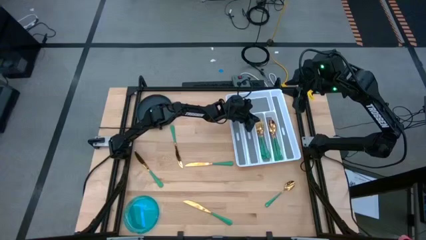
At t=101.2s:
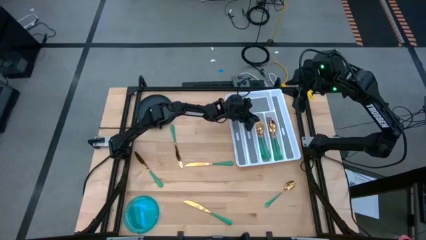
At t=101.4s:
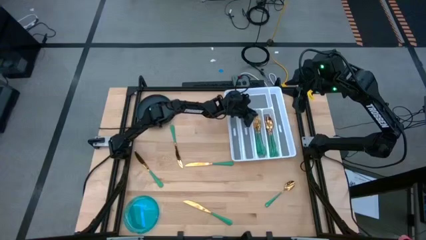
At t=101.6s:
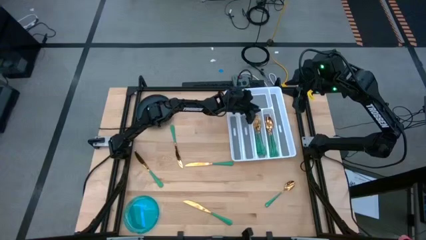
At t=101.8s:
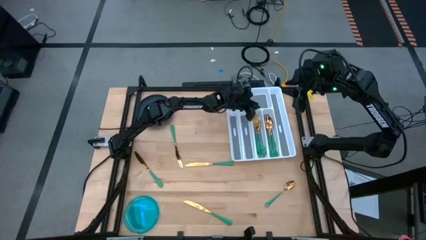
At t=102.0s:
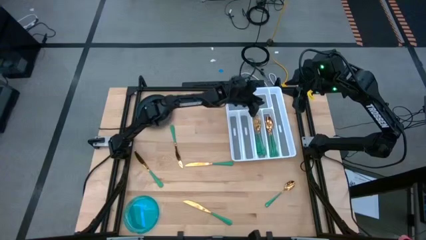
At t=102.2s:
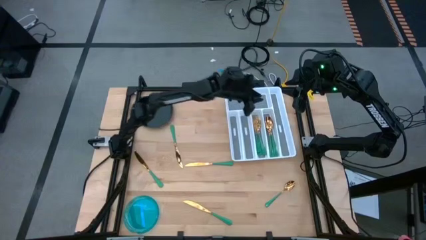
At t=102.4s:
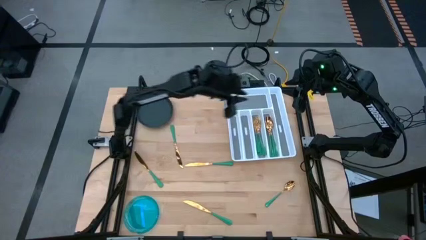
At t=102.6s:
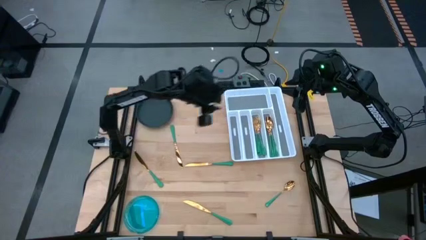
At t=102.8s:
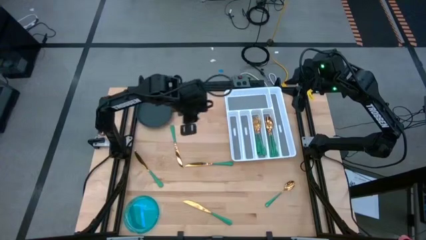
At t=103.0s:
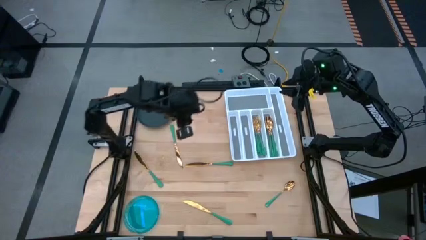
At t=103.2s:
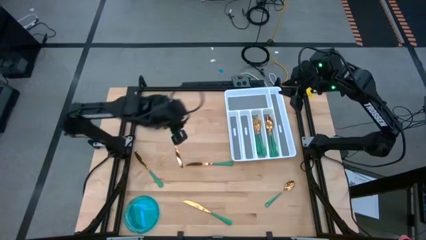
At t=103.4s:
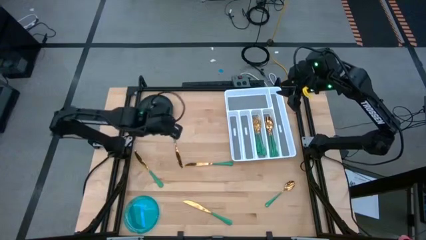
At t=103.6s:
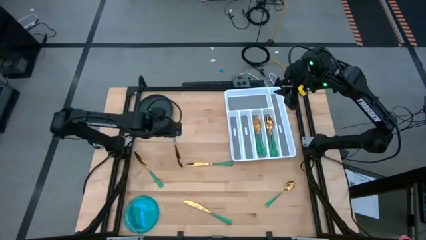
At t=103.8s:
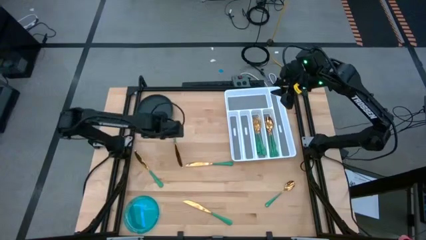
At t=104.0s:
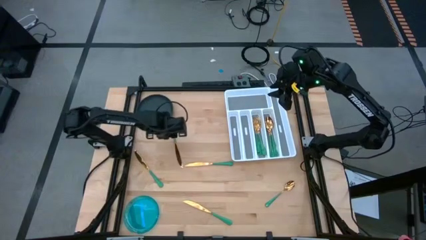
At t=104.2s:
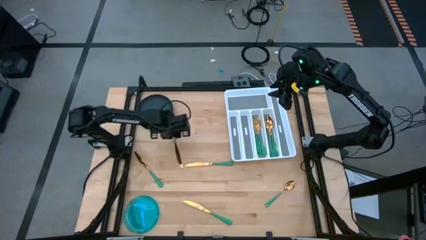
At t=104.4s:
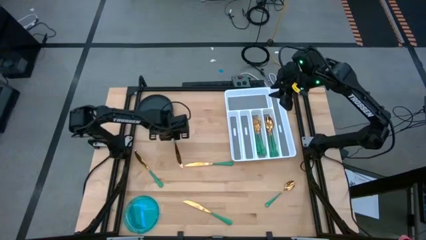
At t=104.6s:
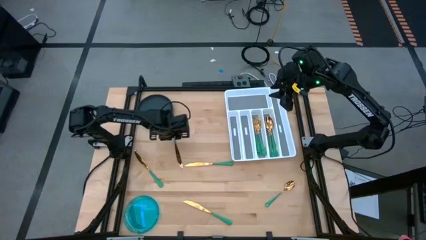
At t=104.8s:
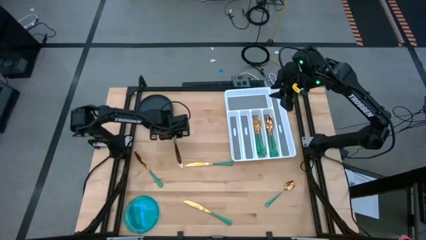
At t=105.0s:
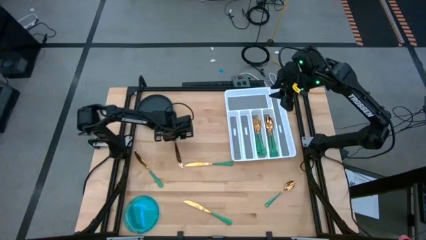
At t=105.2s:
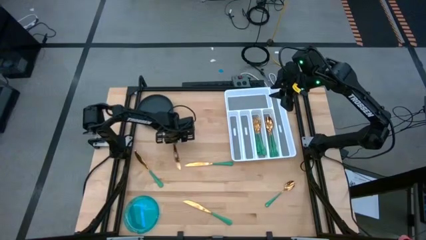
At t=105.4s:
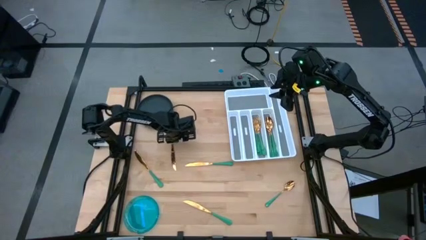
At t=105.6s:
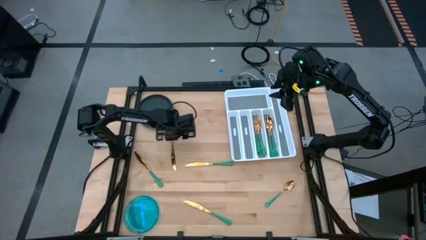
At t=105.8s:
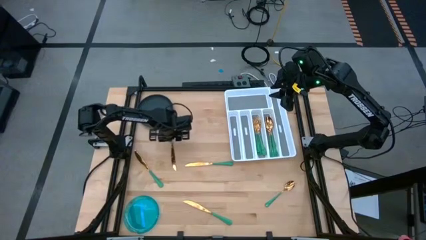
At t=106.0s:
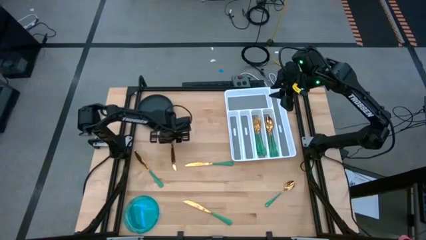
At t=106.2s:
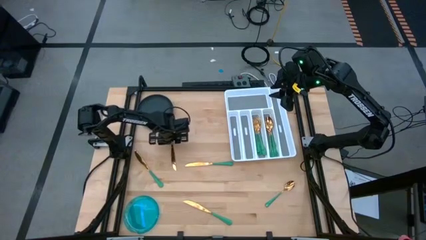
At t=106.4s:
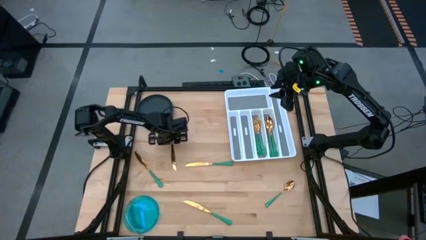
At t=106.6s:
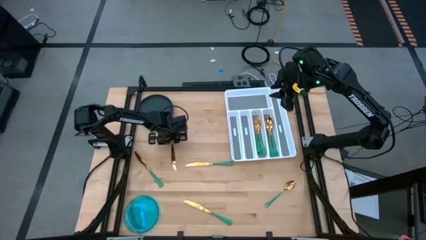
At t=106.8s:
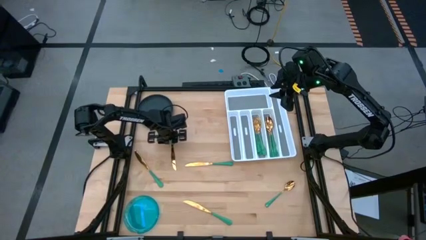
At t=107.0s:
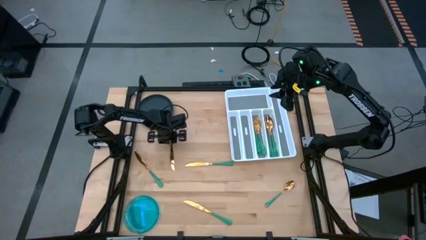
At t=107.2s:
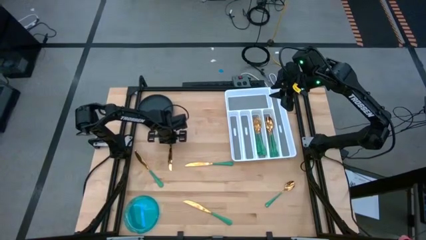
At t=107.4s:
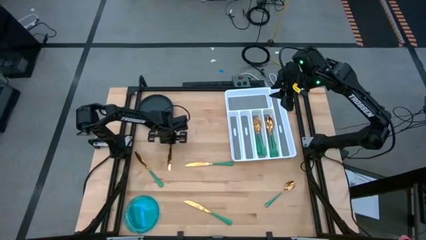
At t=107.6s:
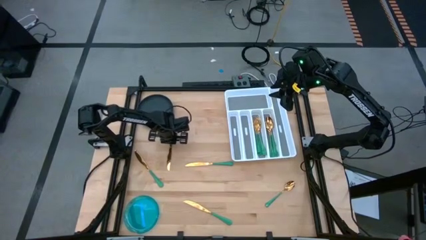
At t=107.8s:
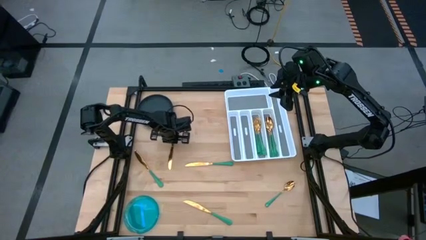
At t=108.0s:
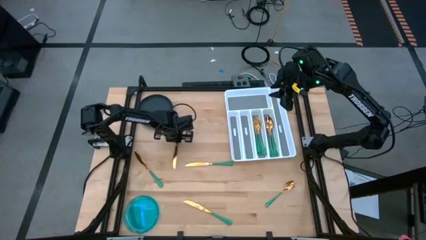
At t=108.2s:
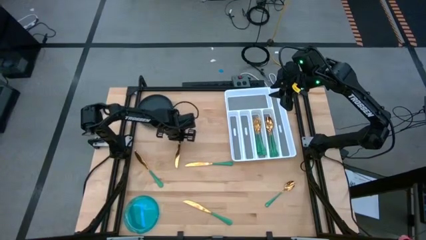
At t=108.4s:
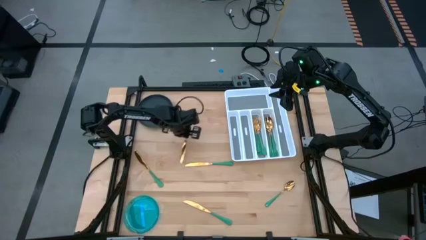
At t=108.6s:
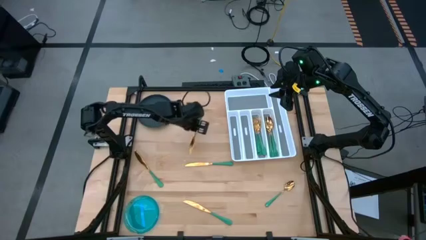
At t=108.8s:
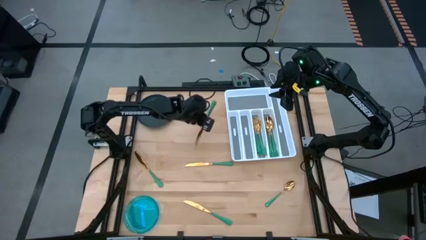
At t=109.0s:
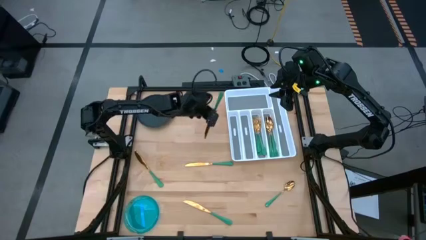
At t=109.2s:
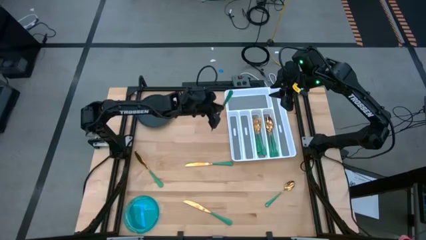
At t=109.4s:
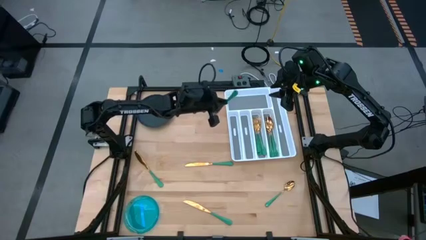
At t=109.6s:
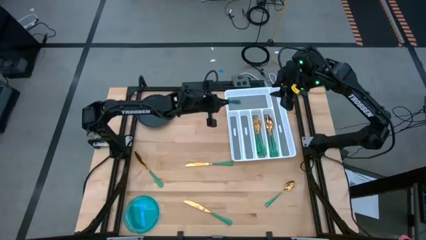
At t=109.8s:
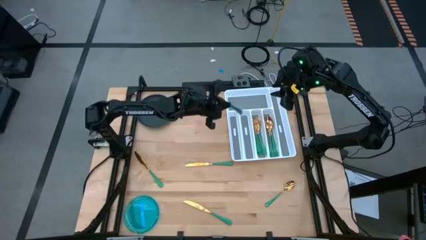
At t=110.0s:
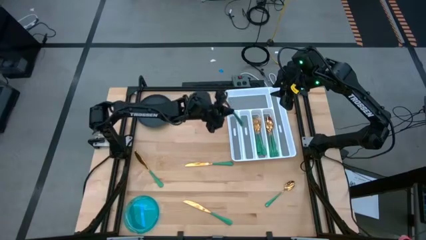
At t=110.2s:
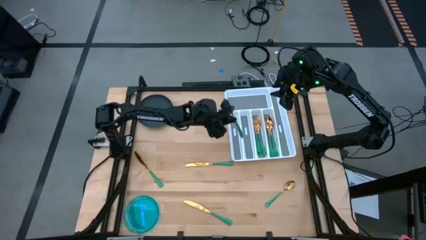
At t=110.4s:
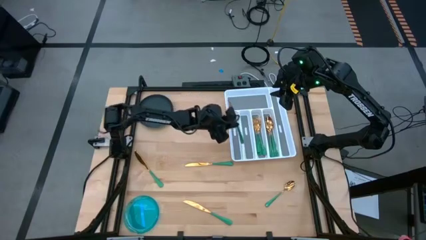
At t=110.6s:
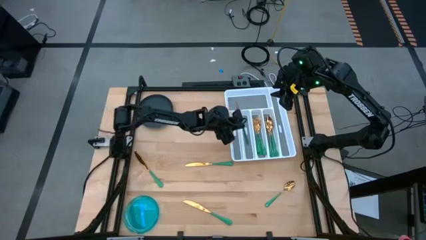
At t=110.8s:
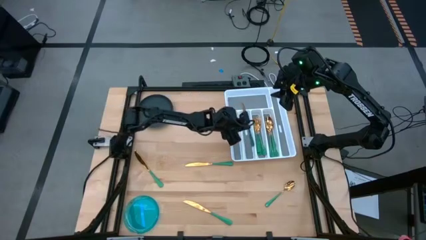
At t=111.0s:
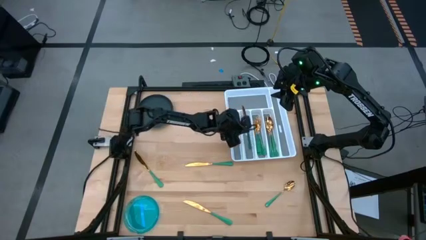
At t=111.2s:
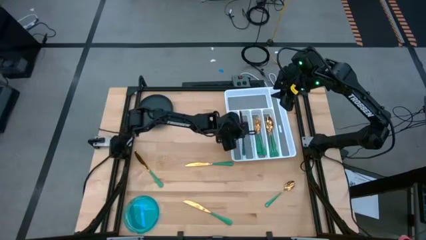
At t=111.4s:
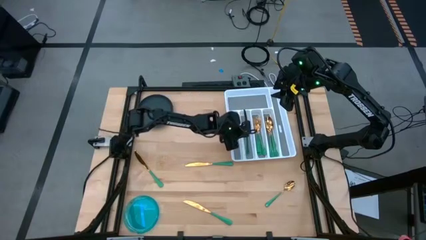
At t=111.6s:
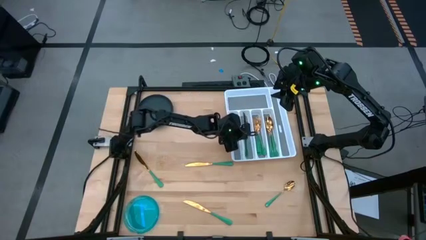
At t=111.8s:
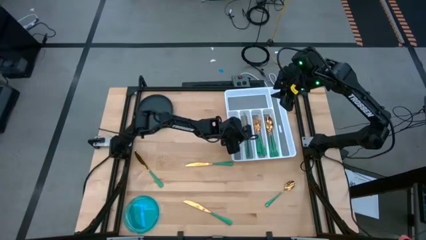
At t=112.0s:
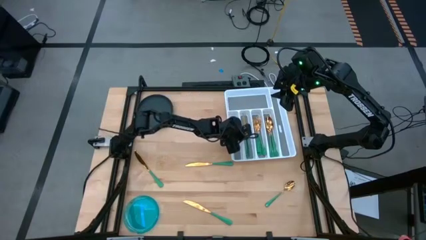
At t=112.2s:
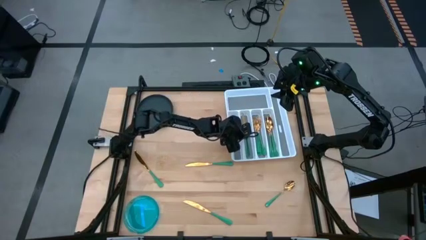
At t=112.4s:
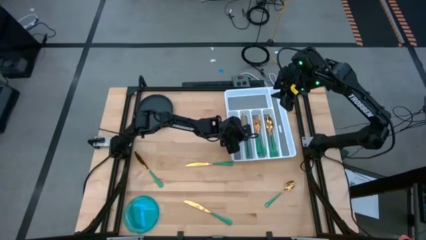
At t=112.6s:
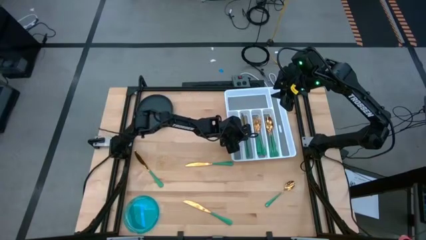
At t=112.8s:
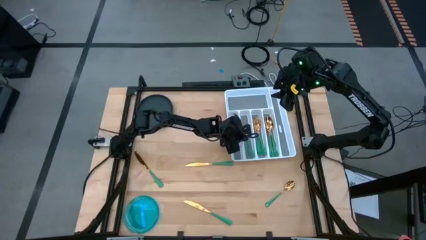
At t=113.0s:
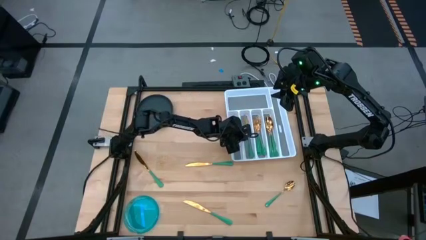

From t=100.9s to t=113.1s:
Task: Sort silverware
Put the green knife into the white silverware organizer

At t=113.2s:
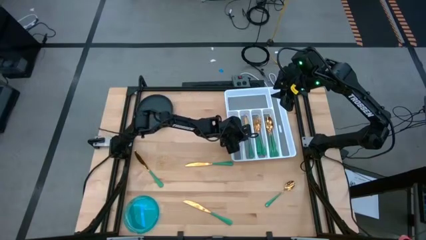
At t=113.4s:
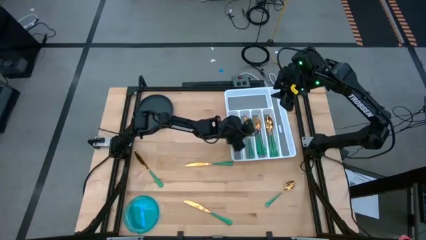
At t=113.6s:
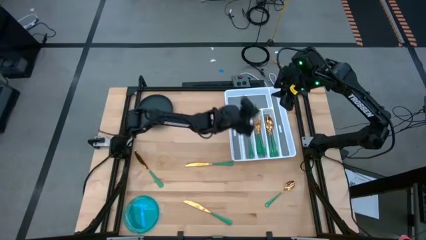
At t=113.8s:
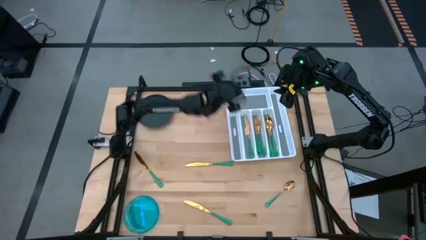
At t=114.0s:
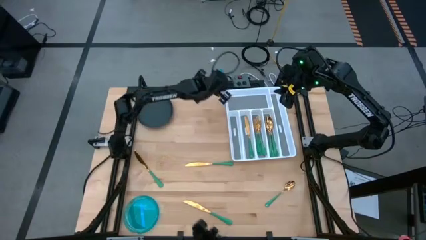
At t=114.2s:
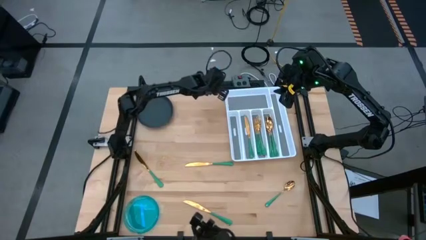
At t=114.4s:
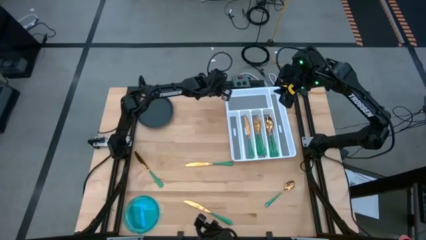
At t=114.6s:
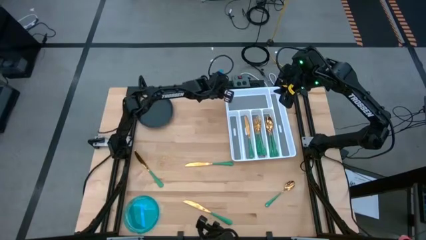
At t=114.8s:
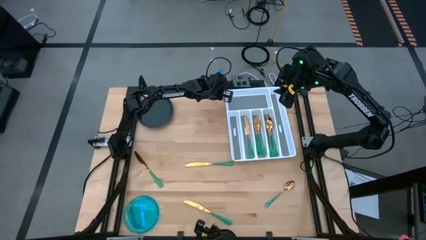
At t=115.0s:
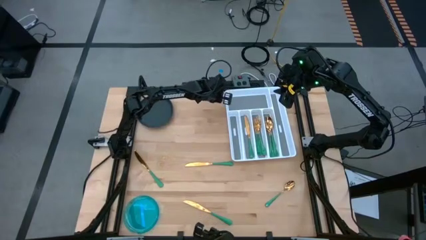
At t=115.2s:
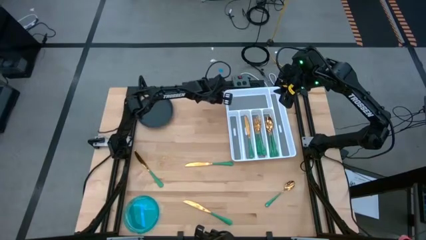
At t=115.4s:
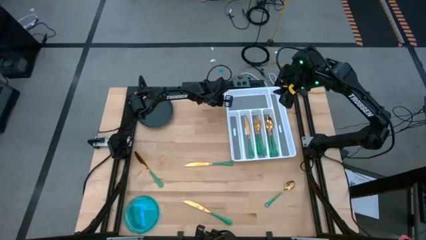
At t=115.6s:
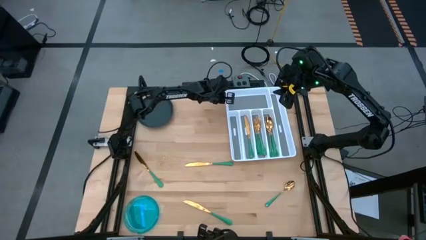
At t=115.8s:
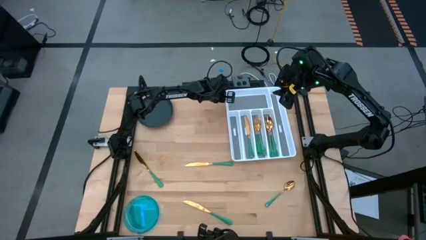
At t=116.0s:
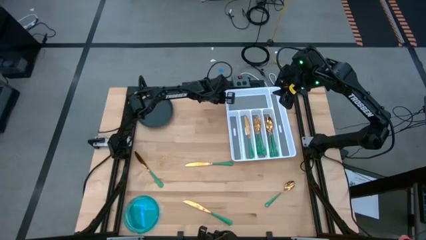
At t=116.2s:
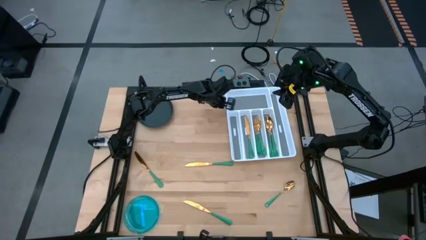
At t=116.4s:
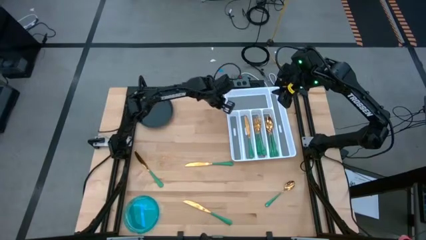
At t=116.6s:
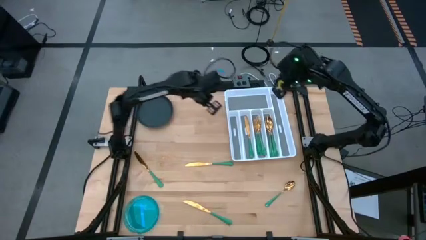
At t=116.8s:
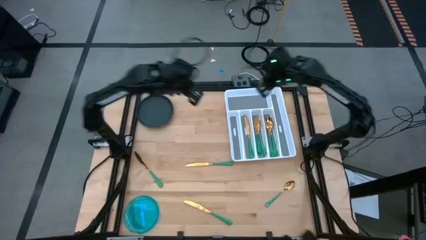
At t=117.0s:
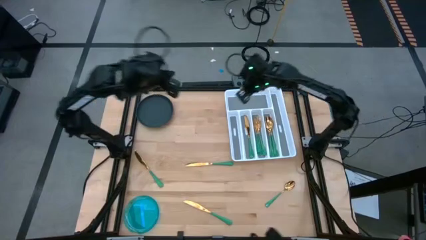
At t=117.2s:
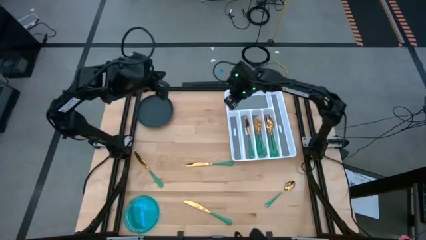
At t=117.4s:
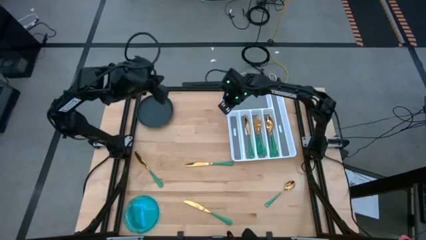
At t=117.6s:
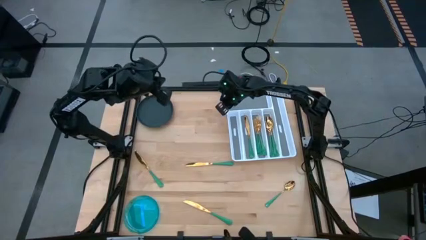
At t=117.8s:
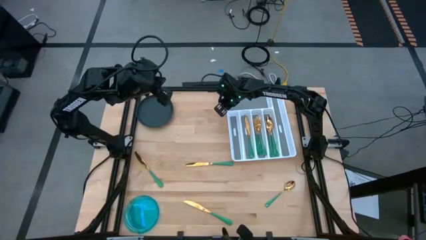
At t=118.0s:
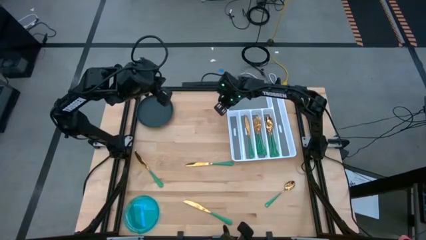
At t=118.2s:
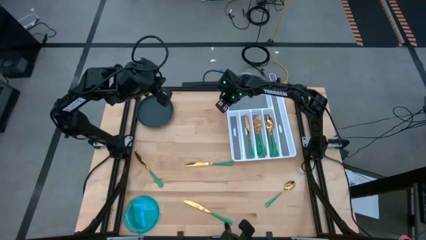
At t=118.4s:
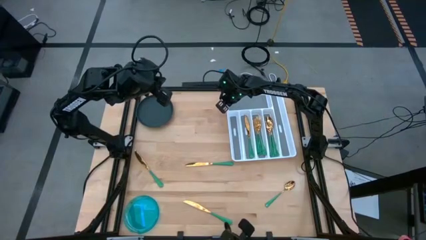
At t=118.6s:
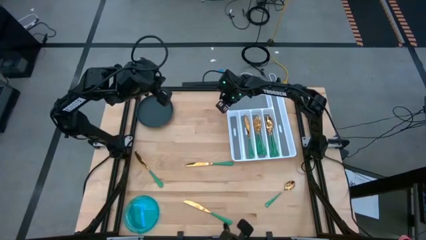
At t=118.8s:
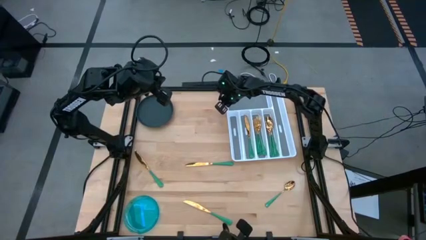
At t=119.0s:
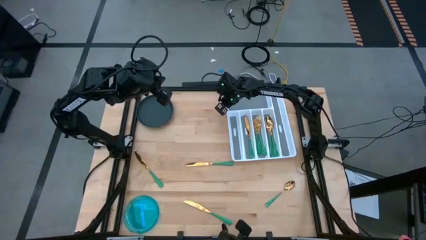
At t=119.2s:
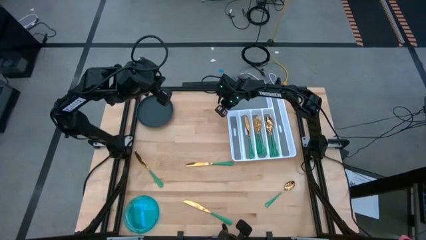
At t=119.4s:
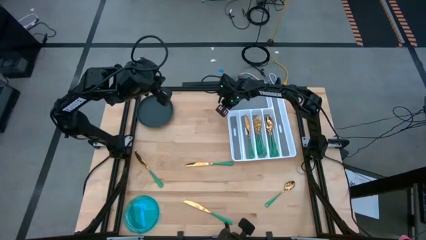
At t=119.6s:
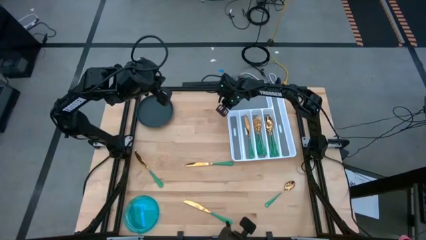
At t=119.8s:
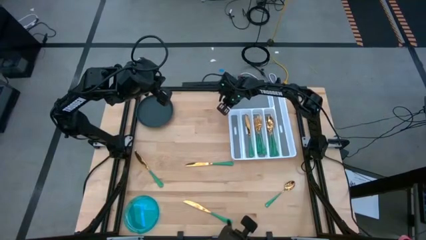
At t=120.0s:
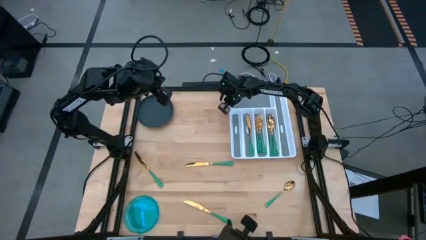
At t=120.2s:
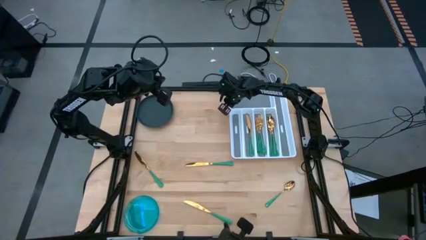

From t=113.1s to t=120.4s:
Adjust the white silverware organizer
